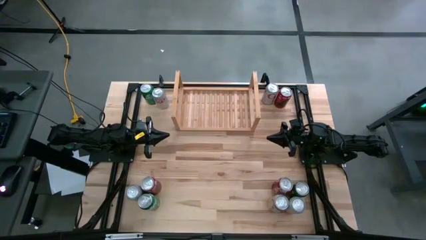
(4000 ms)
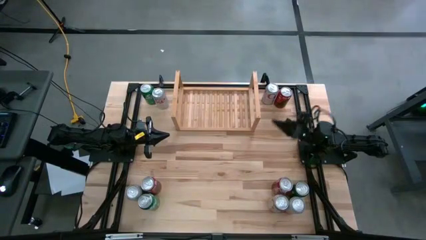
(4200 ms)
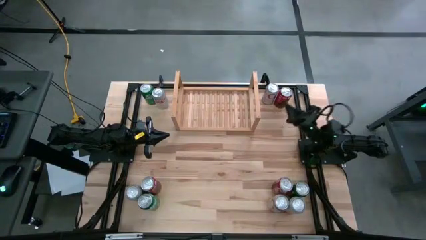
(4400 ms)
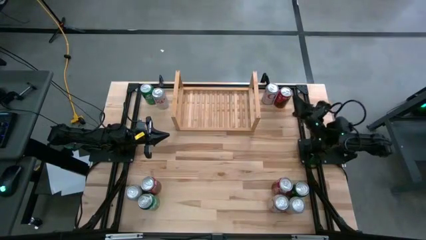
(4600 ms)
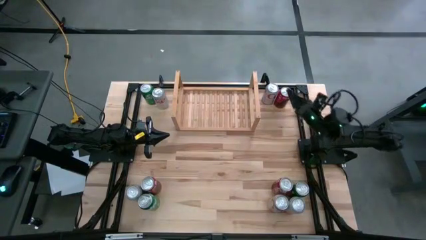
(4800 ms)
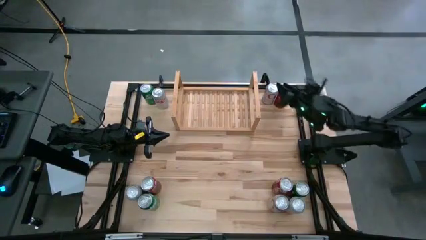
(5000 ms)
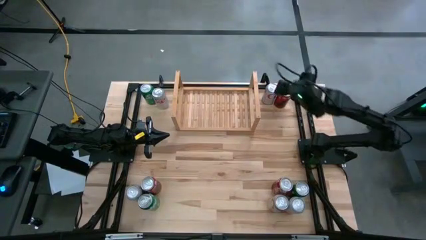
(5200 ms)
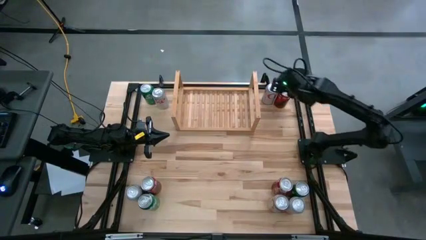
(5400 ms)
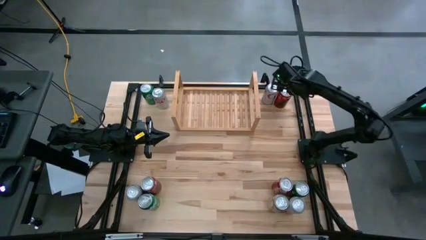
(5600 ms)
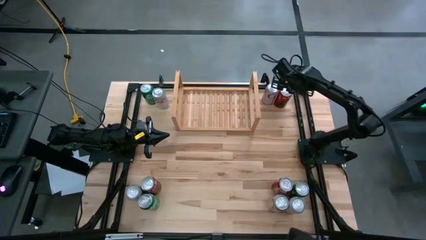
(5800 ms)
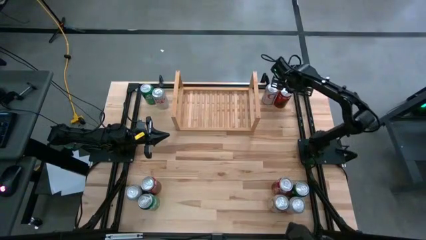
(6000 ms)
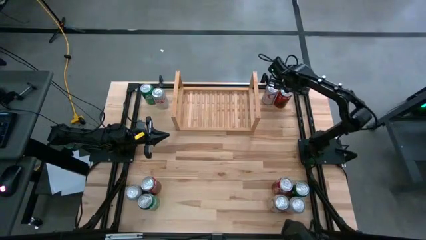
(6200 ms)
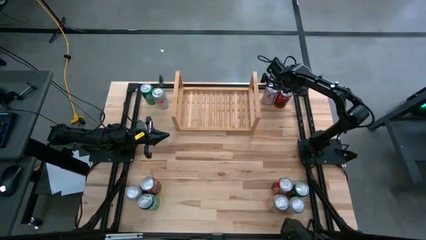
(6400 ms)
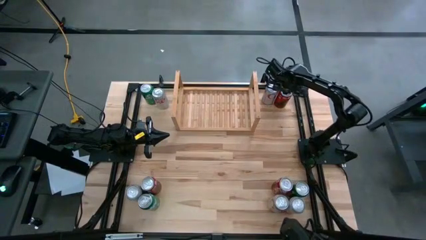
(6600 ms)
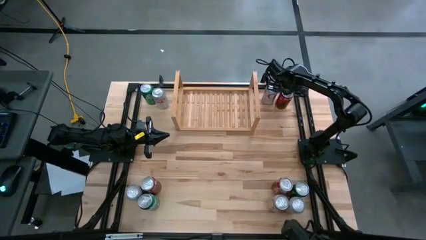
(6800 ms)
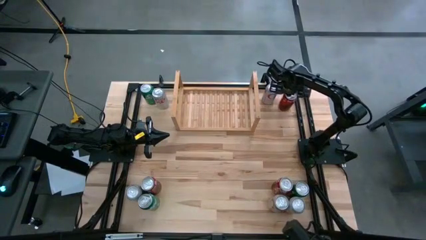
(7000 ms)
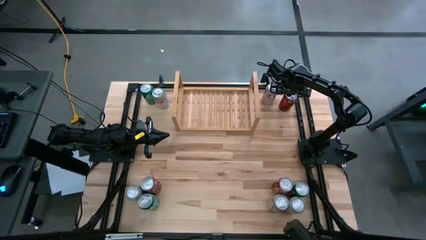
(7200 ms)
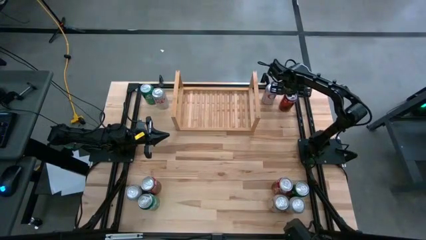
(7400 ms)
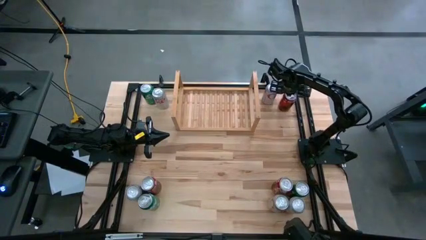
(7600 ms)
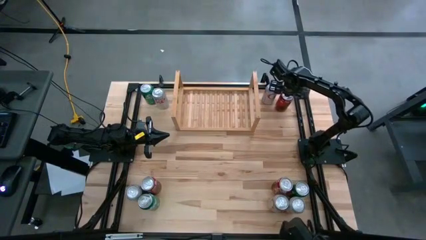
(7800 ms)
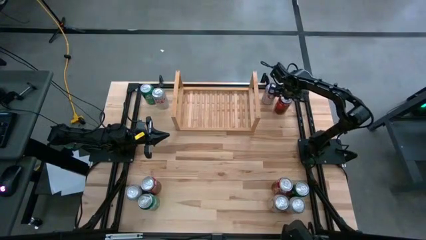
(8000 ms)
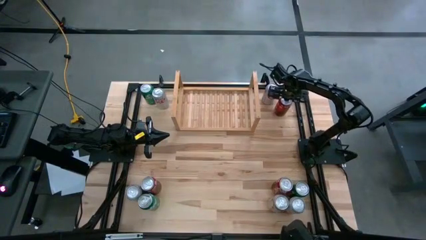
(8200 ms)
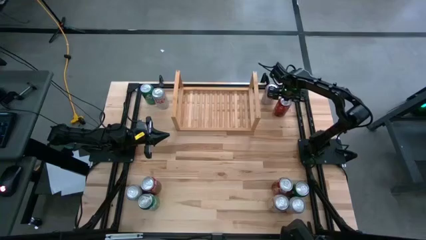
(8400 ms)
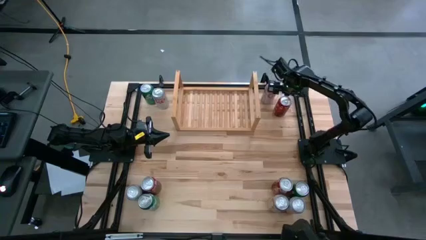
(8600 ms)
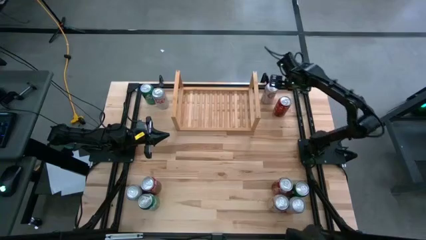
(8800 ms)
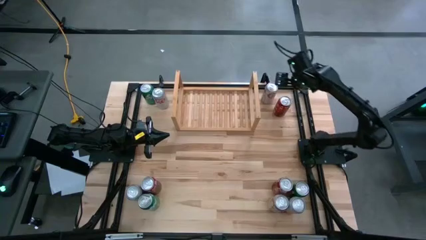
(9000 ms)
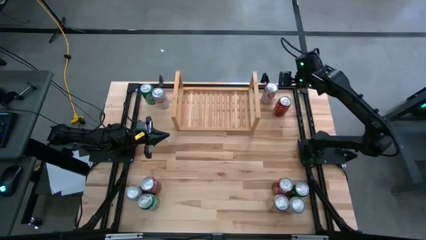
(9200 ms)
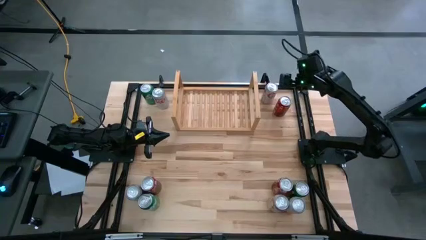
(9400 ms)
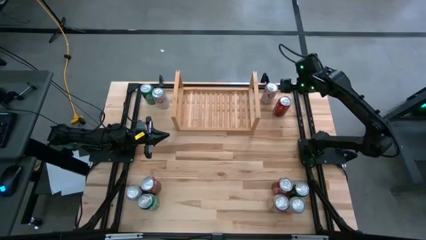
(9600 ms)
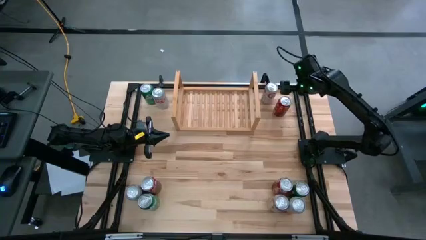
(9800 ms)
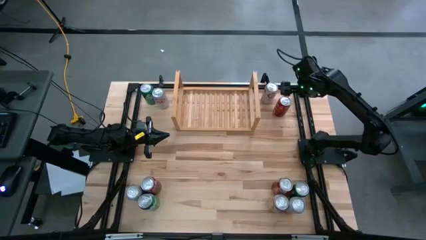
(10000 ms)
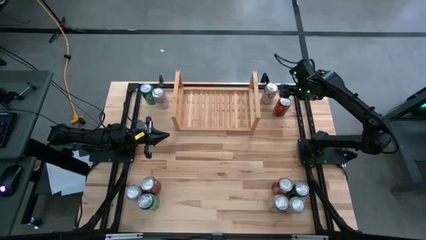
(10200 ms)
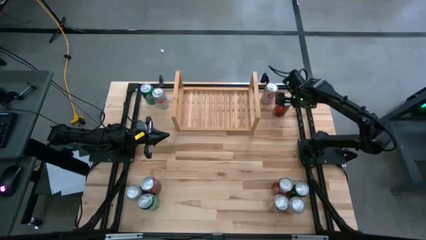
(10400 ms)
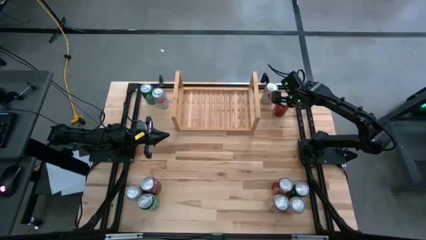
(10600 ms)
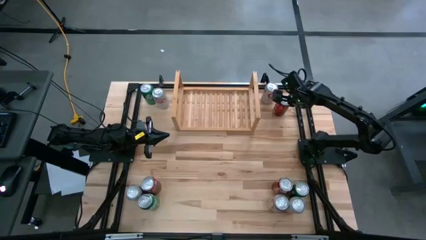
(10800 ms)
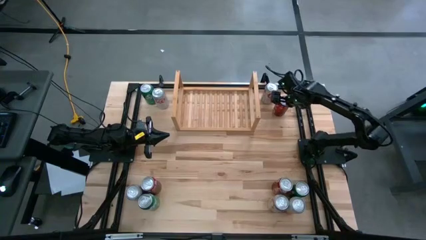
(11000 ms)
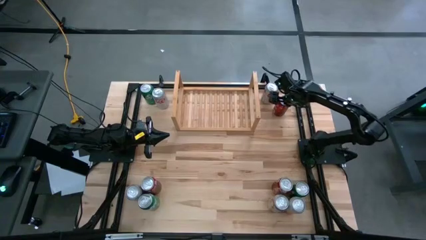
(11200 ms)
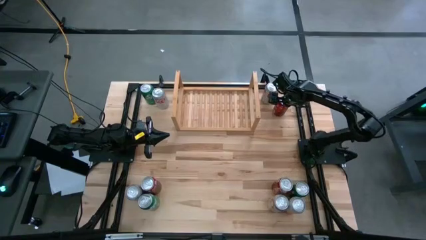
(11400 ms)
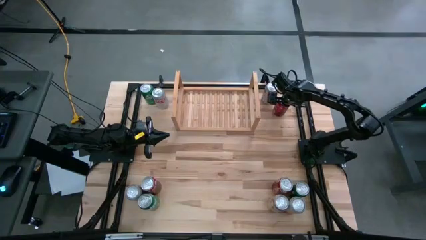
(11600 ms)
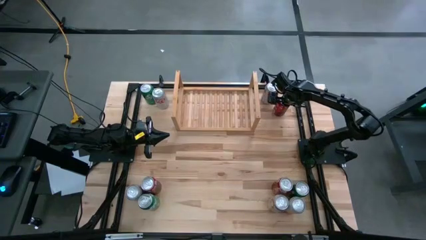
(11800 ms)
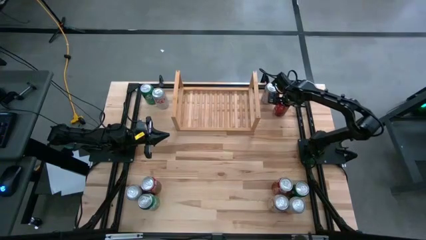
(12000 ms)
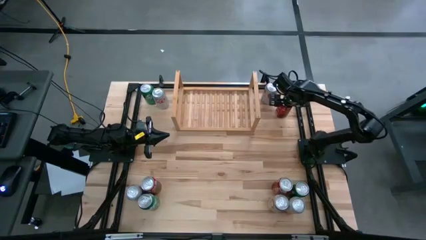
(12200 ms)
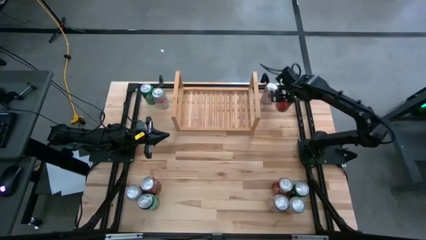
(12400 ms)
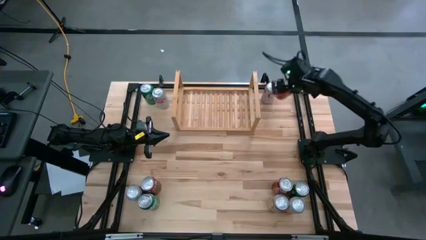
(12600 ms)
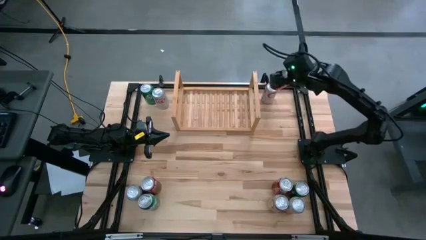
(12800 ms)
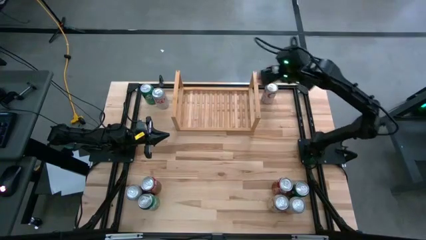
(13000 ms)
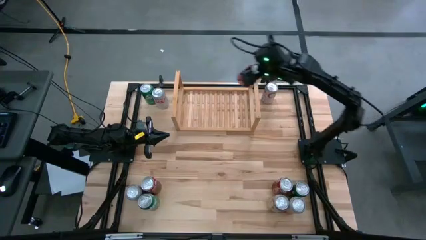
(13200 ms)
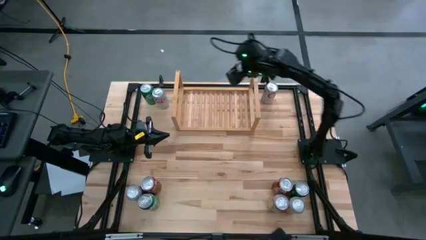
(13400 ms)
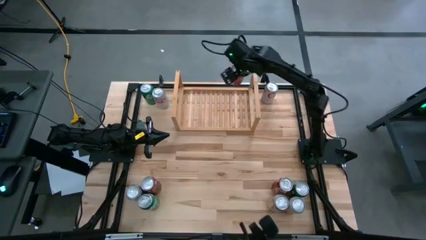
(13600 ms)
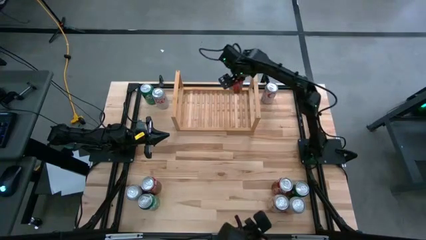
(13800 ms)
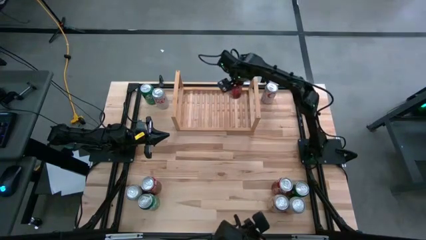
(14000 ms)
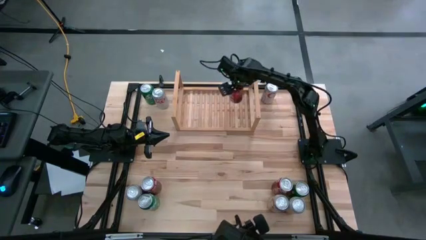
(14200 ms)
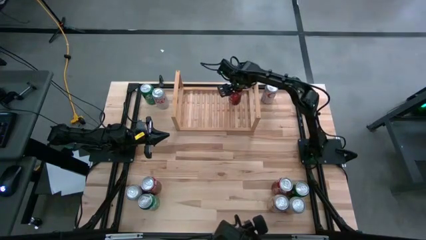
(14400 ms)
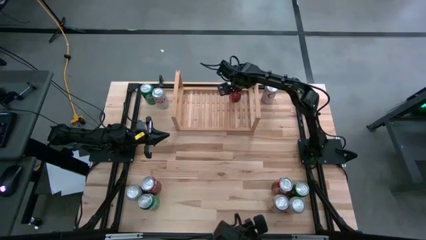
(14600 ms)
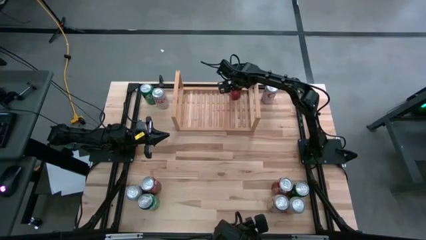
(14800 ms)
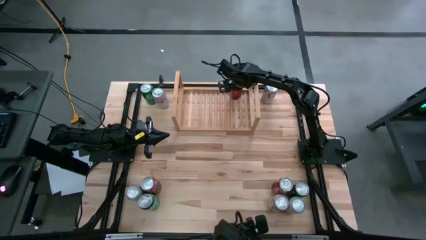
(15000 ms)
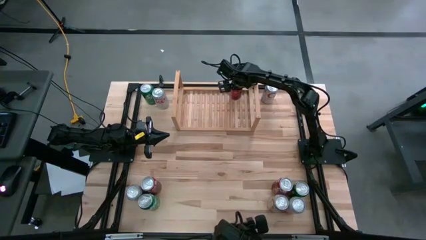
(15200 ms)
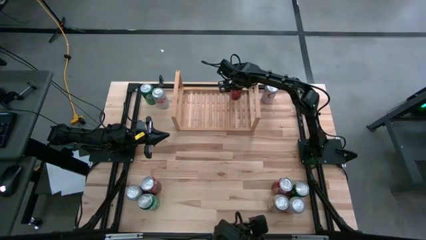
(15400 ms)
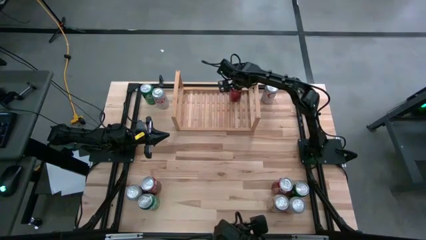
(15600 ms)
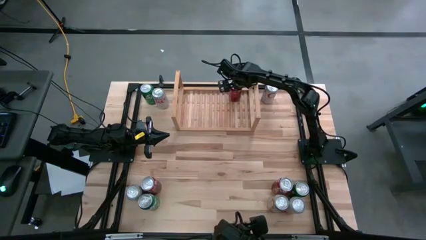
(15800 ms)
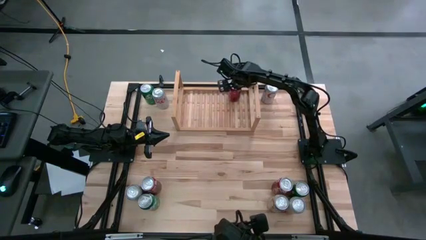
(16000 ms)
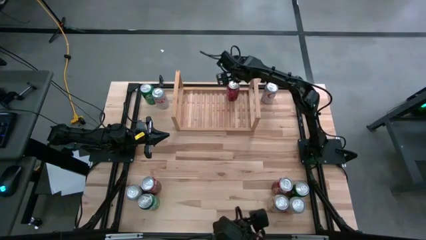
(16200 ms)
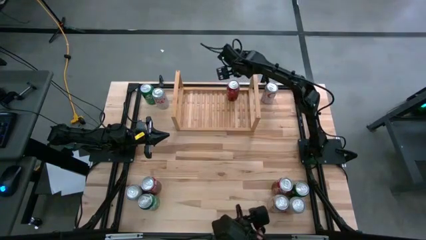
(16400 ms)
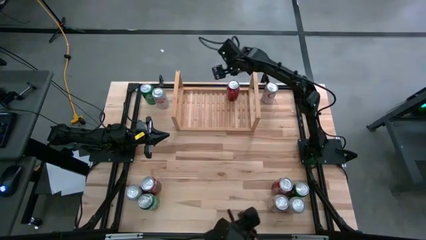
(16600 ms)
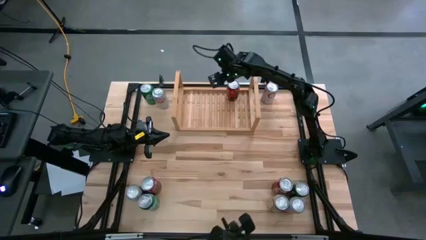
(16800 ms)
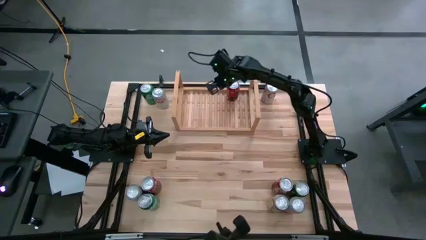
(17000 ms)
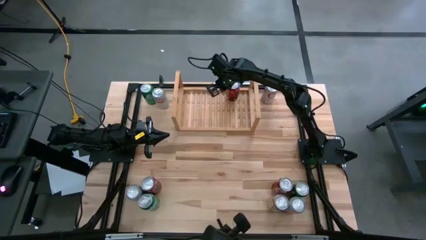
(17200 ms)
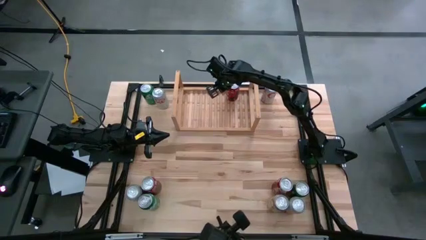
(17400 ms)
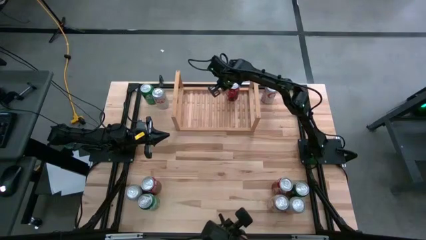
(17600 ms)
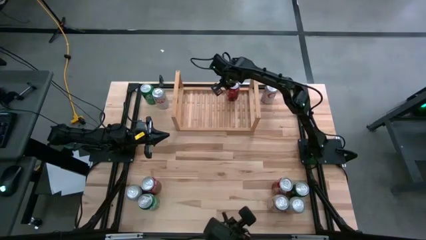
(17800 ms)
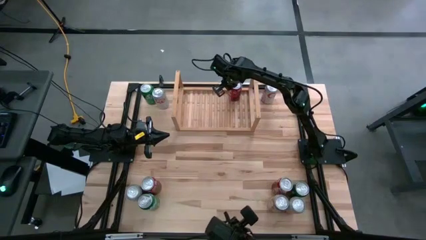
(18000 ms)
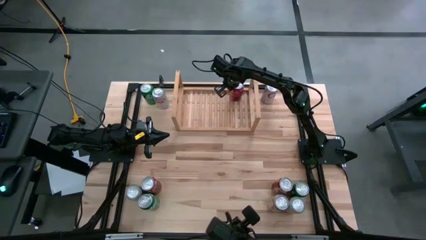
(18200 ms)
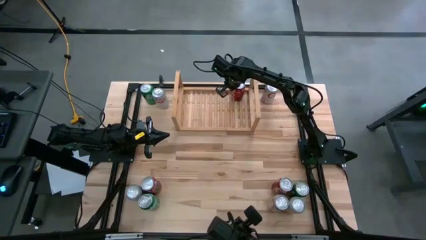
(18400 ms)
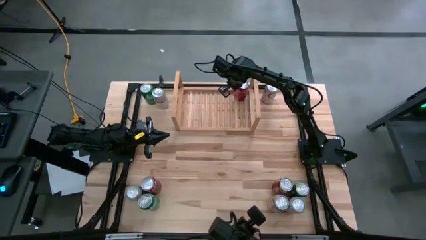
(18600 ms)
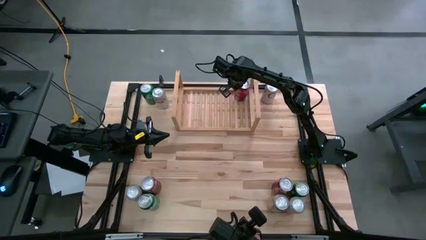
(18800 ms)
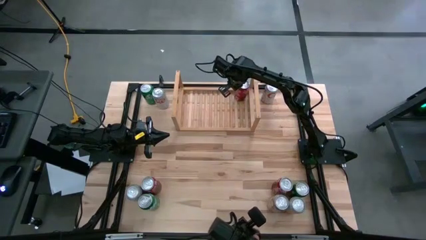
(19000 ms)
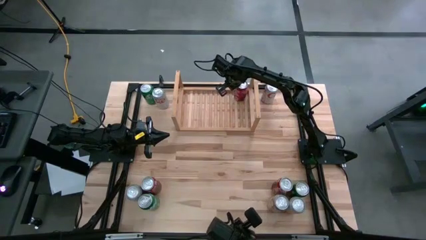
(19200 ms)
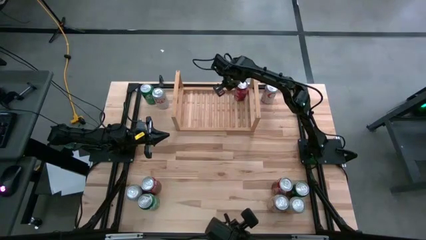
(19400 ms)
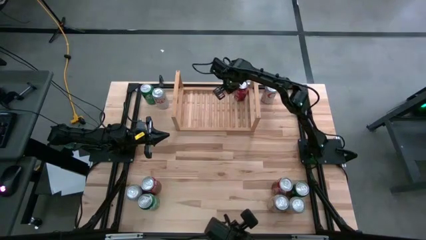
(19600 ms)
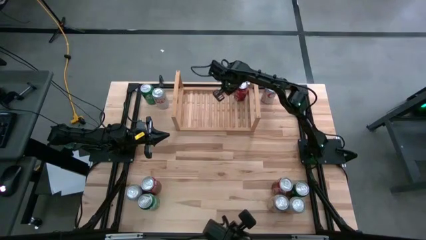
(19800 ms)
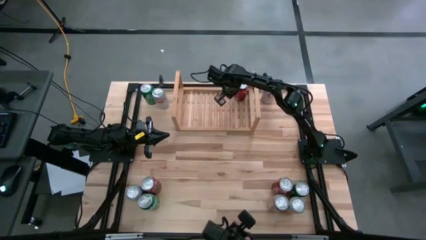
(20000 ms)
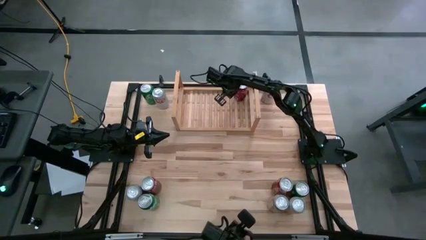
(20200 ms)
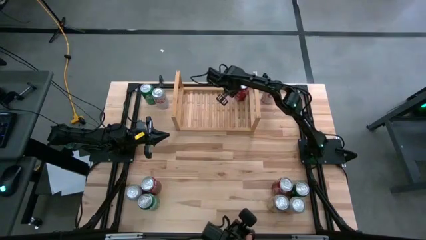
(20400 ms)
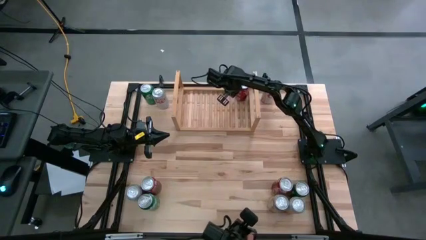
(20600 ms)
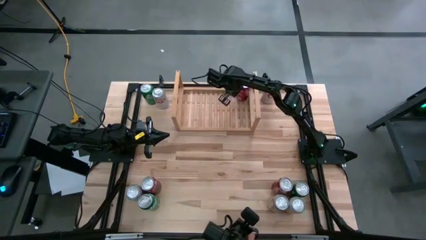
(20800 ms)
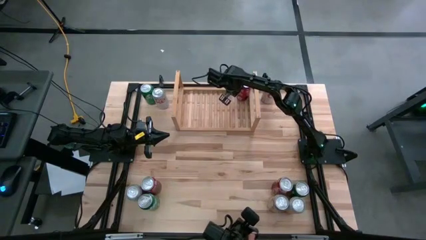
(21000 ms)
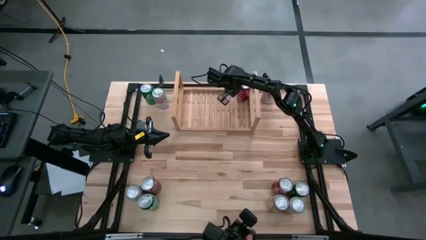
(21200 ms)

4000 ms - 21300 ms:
Task: Place canned beverage on shelf
Put the top red soda can on the shelf
